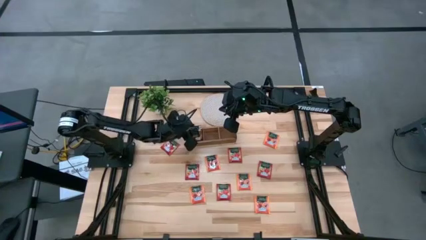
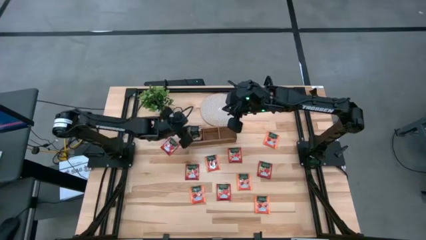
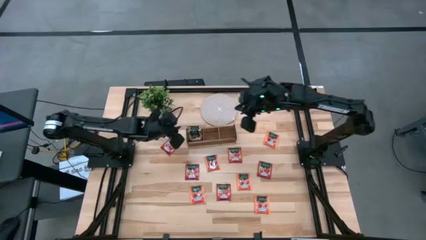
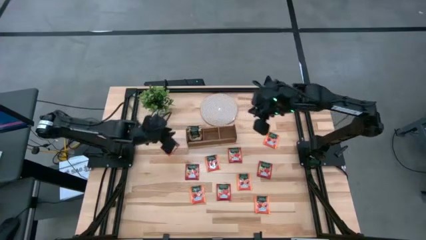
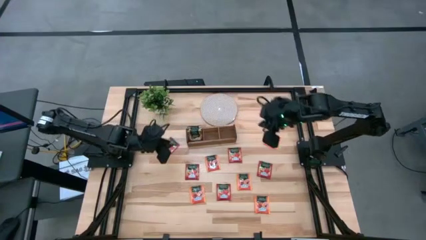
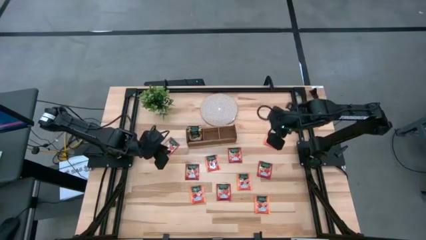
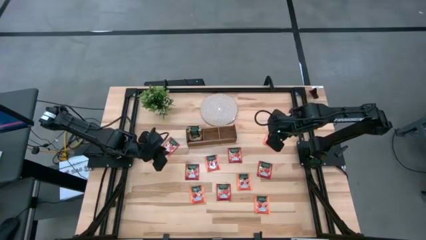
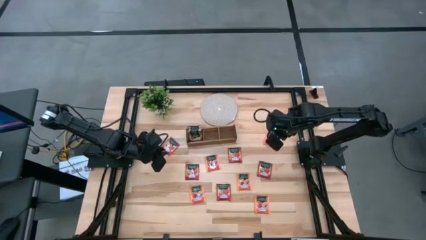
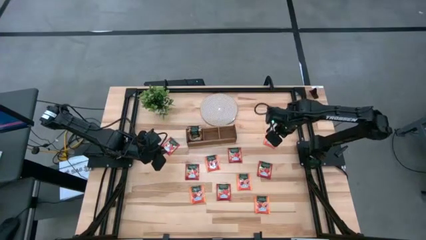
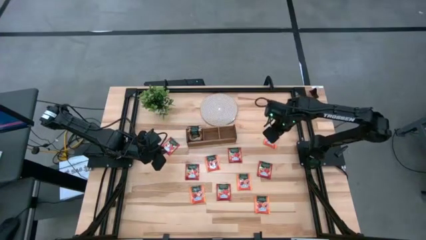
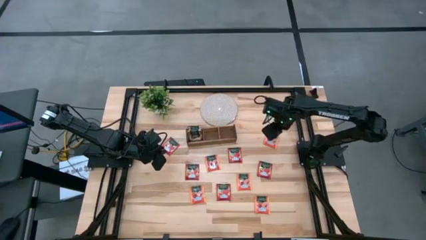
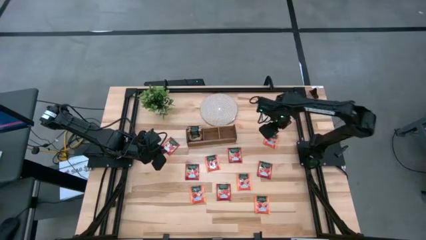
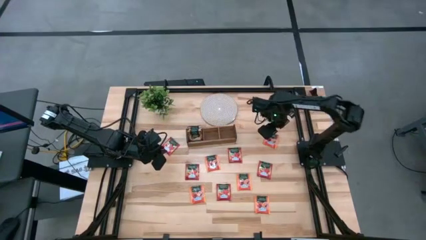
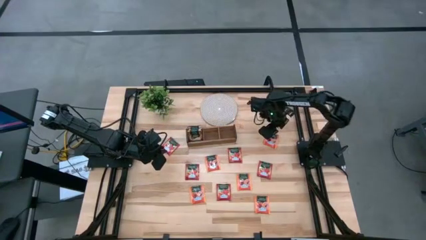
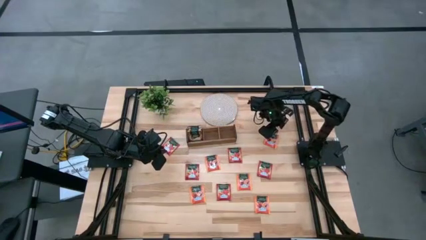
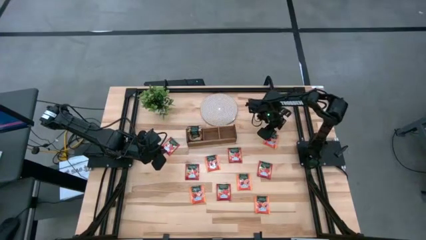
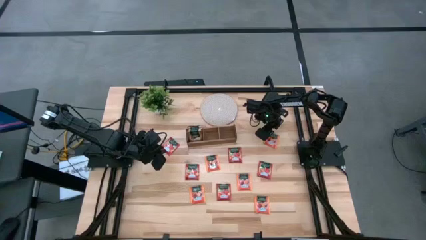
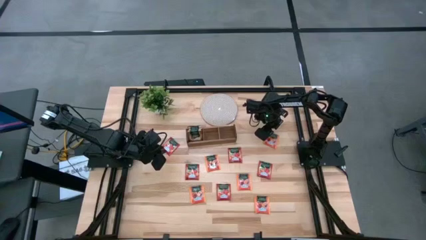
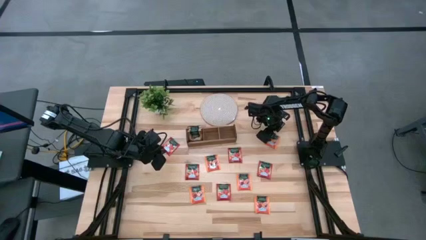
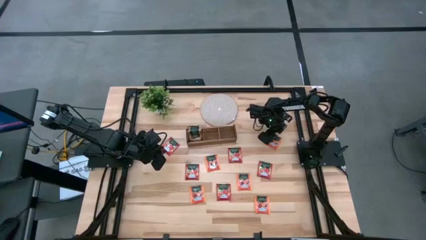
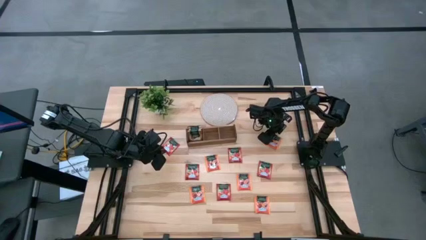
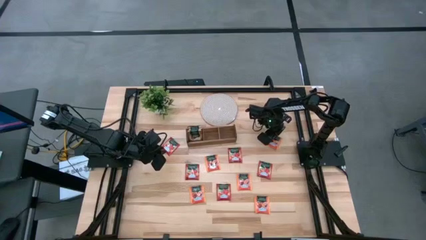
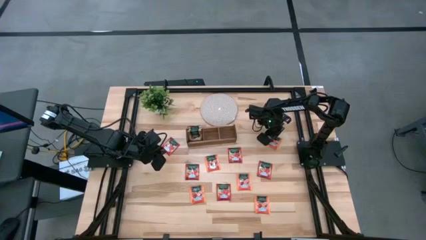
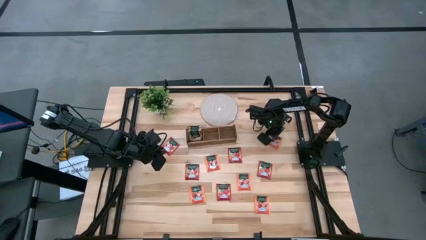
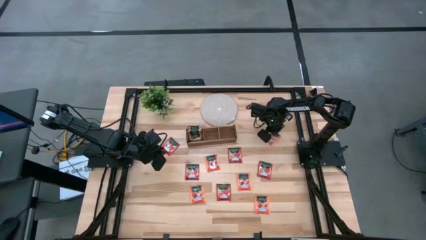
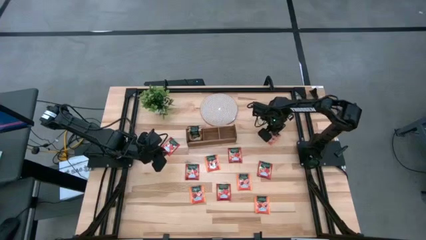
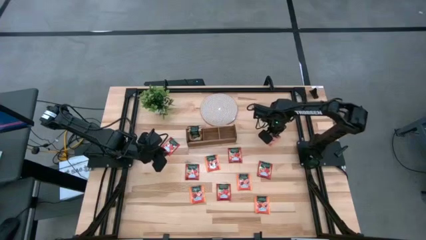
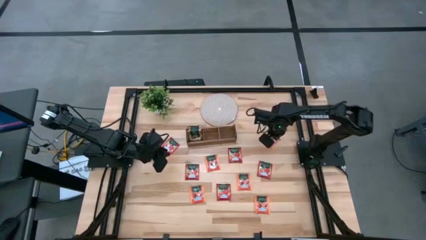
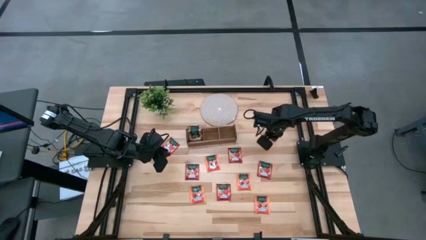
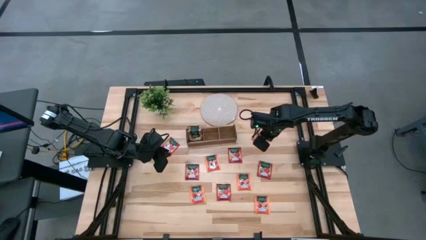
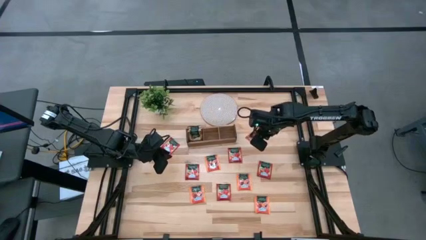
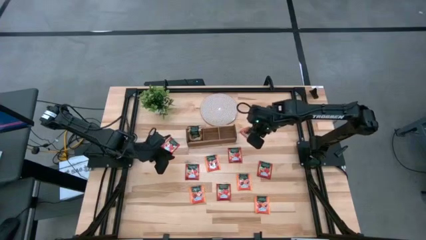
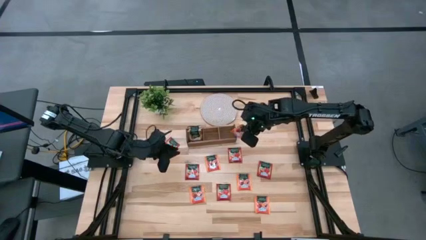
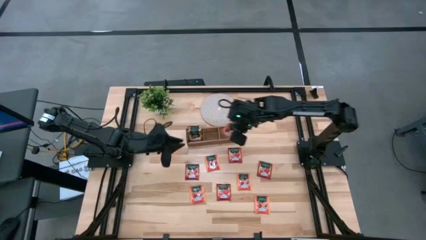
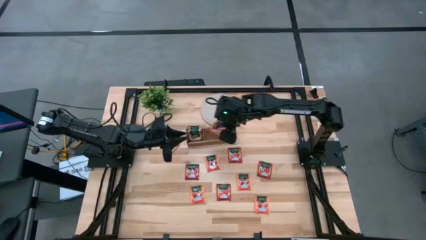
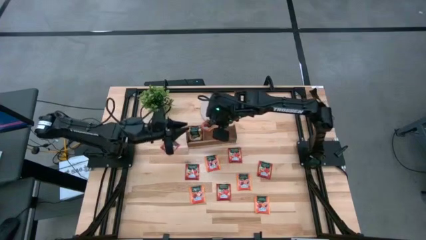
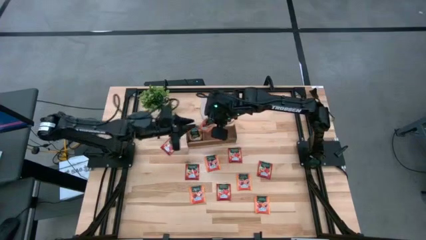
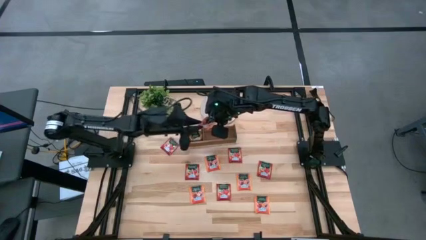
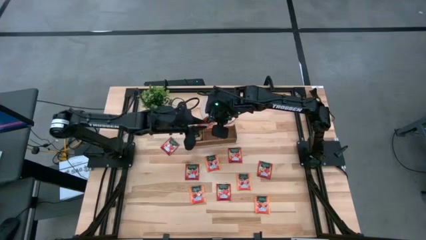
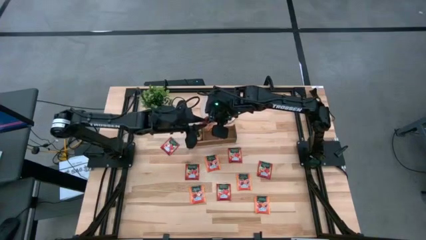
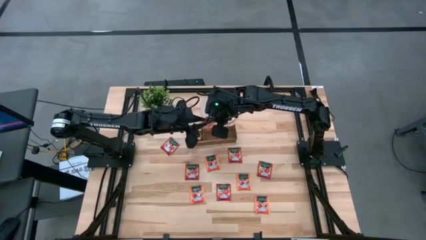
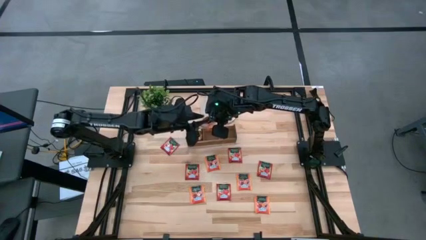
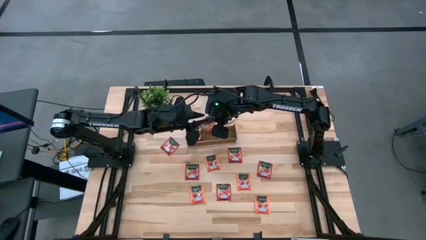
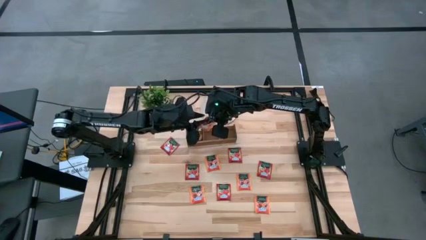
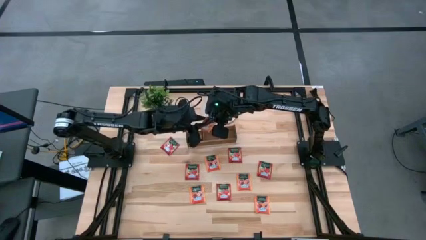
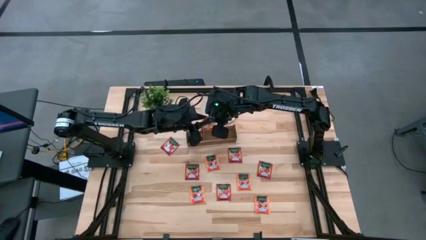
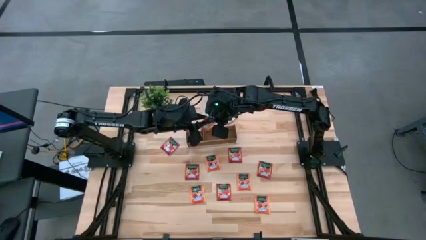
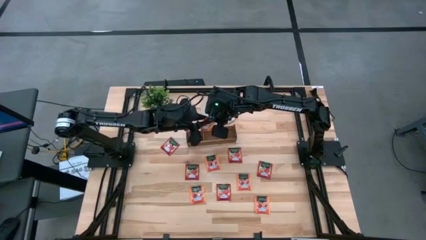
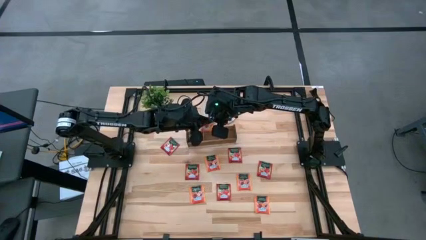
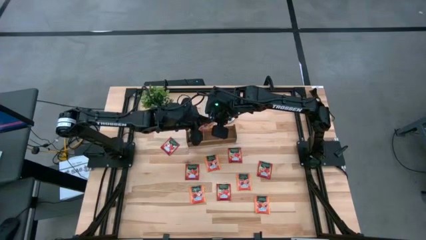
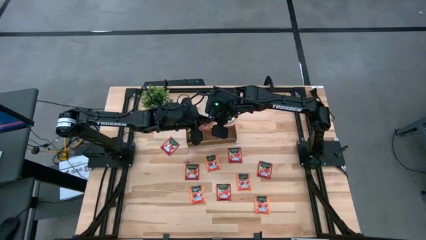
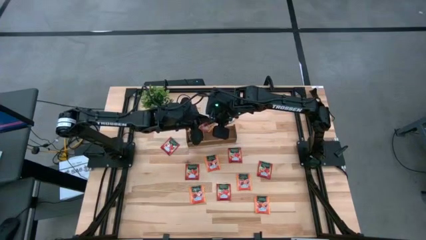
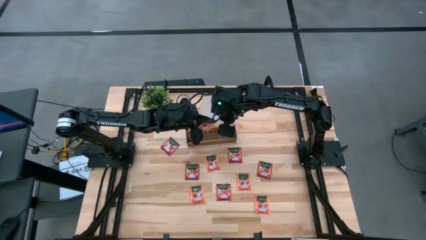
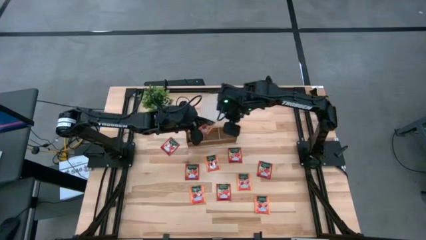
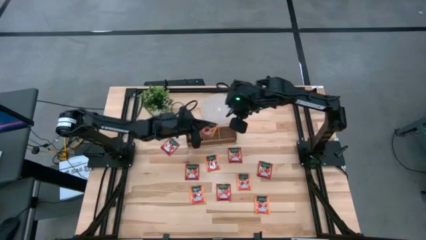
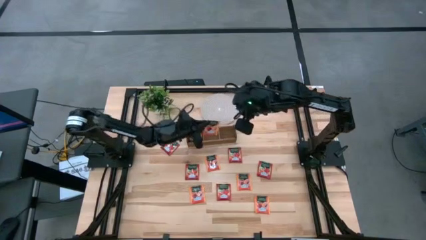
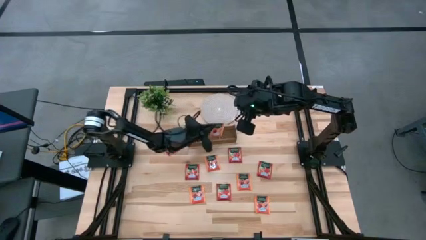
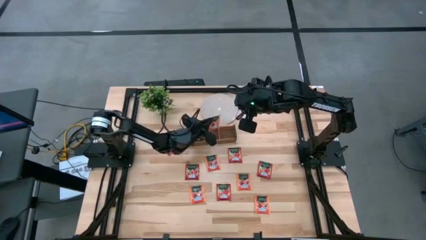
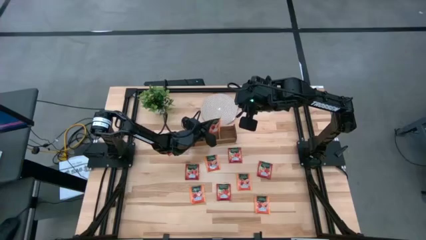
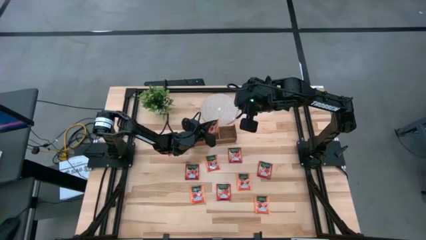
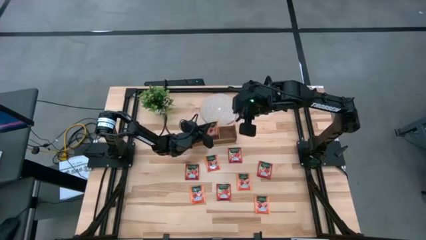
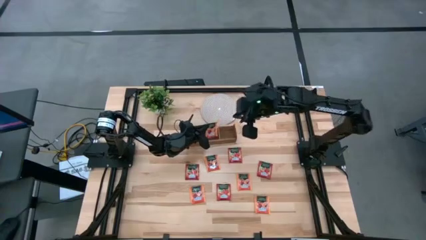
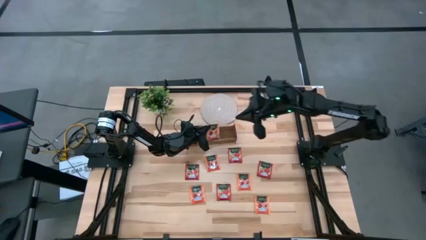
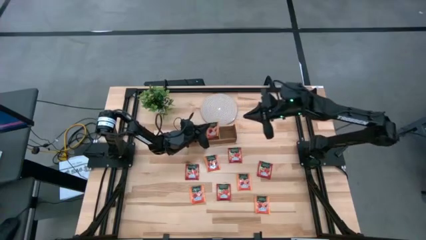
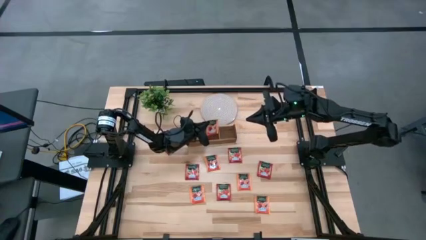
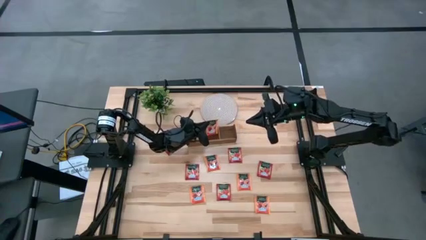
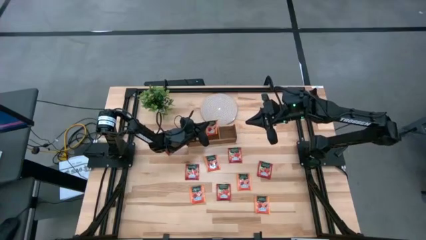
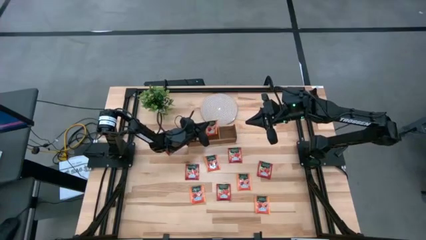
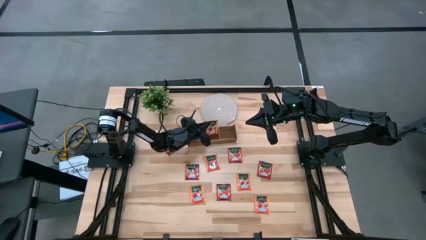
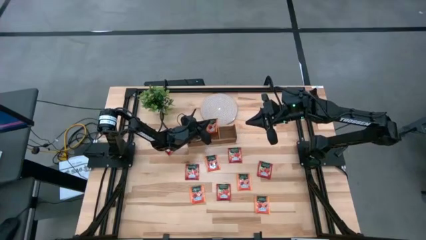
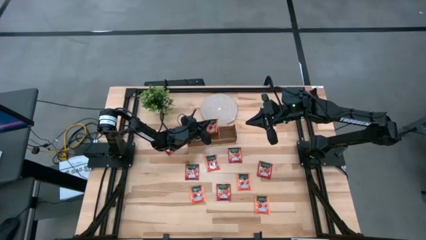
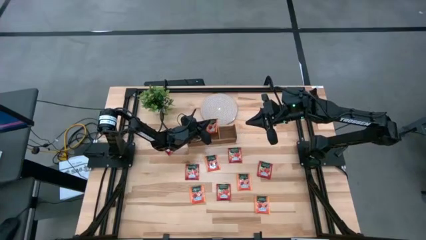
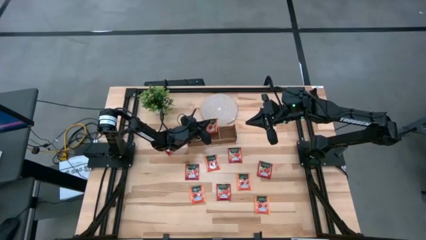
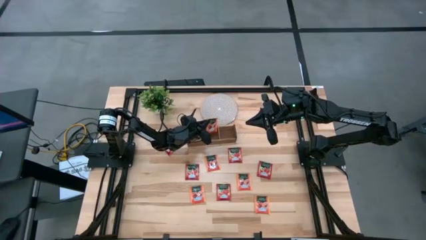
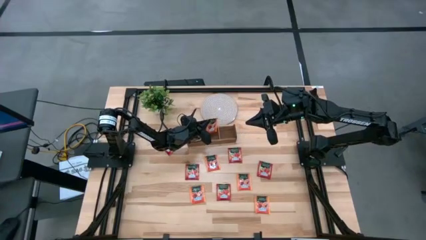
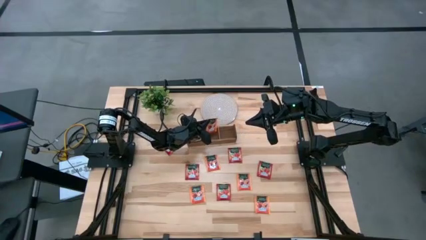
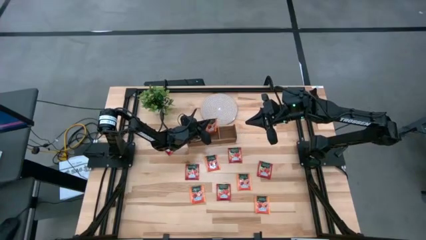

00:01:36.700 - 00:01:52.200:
Task: Pick & Place Tea
Put the orange tea bag into the middle of the wooden organizer
